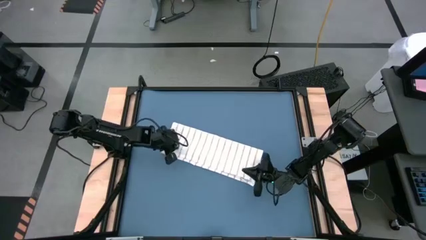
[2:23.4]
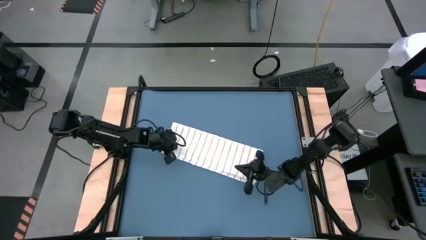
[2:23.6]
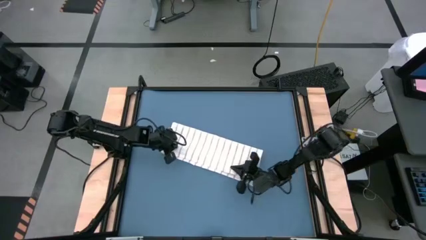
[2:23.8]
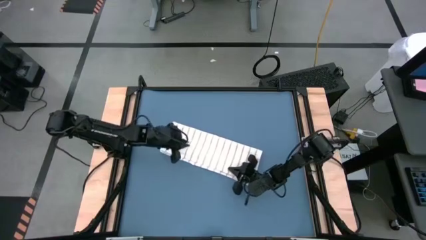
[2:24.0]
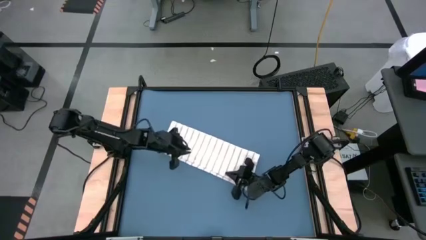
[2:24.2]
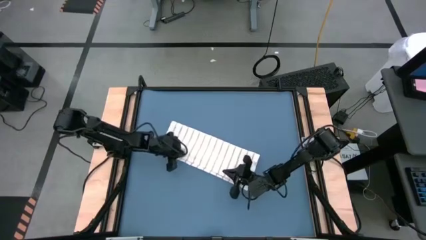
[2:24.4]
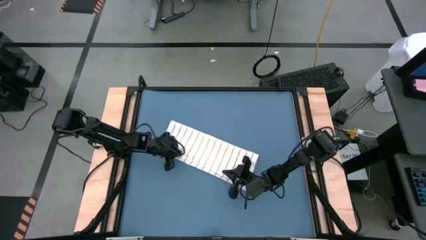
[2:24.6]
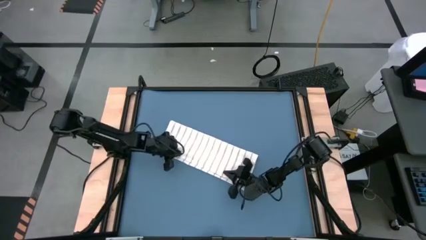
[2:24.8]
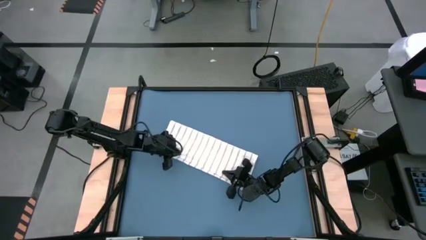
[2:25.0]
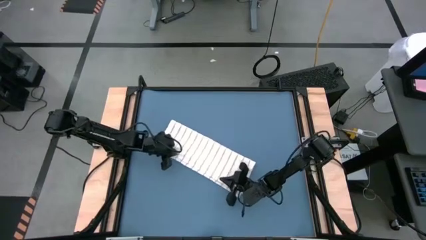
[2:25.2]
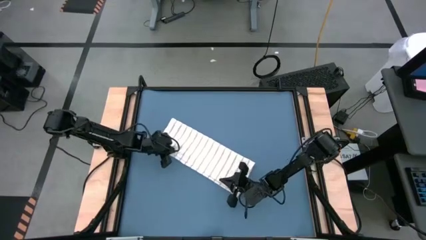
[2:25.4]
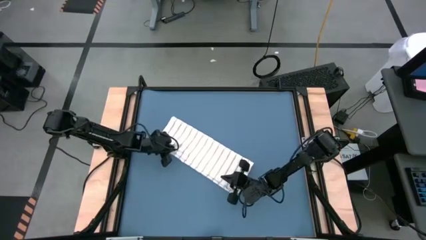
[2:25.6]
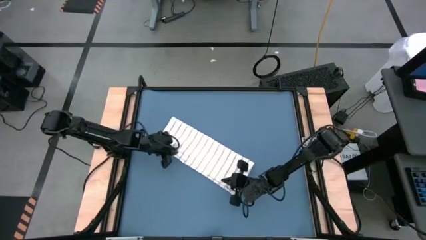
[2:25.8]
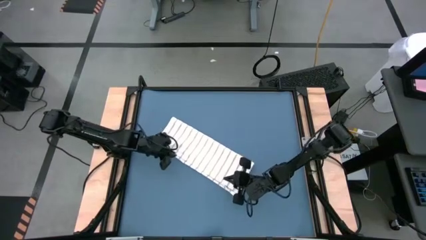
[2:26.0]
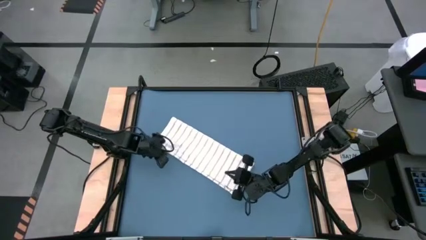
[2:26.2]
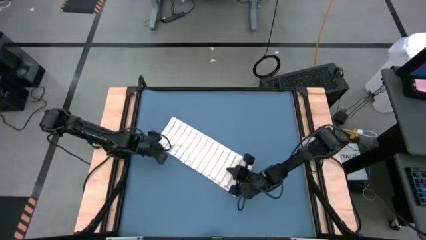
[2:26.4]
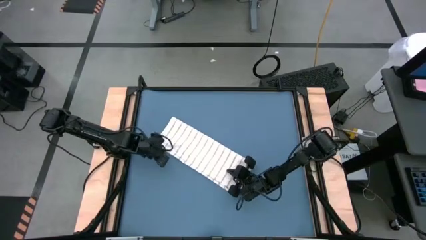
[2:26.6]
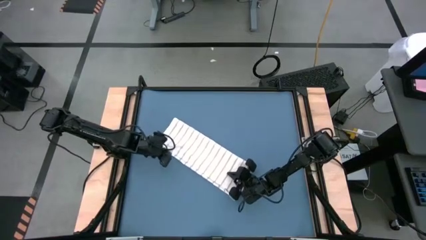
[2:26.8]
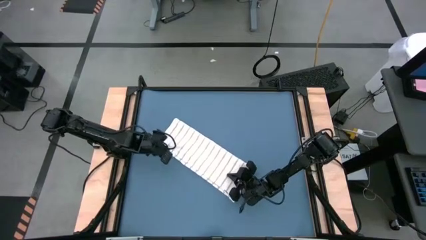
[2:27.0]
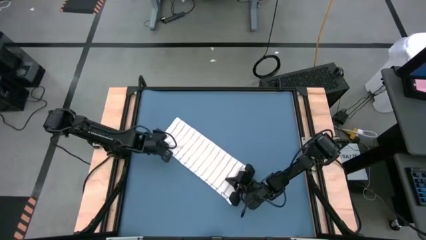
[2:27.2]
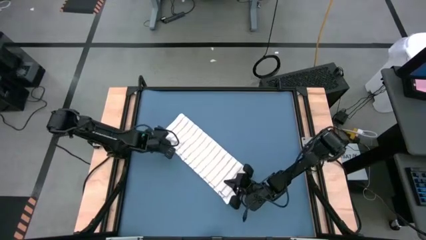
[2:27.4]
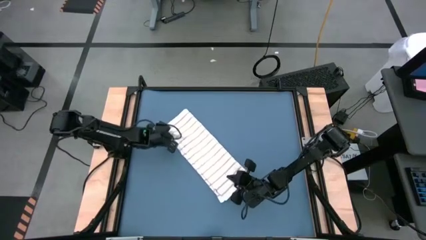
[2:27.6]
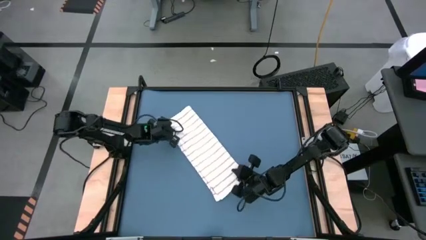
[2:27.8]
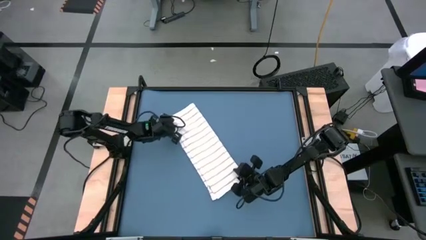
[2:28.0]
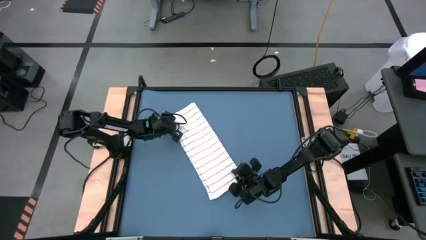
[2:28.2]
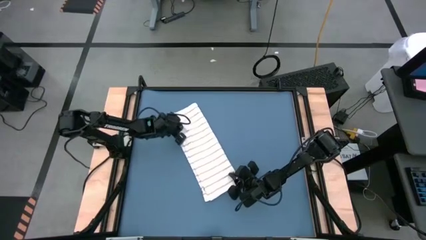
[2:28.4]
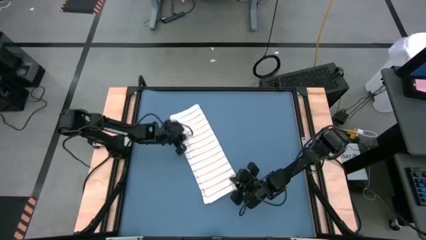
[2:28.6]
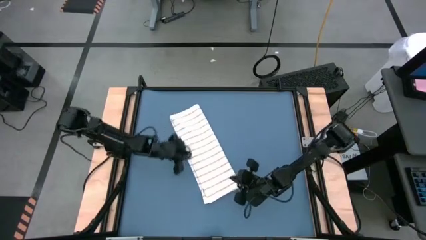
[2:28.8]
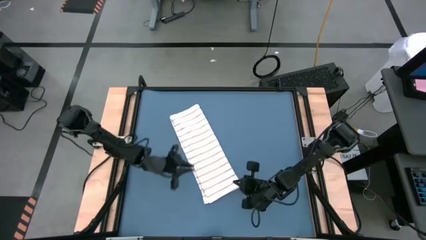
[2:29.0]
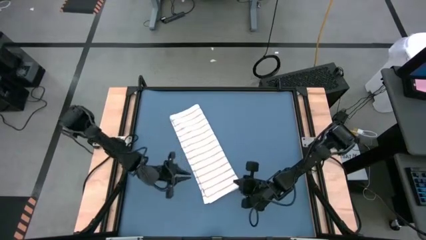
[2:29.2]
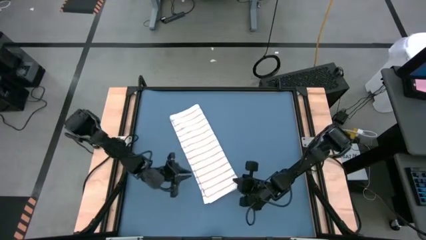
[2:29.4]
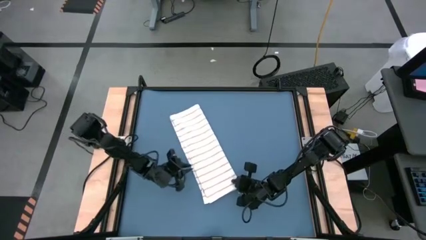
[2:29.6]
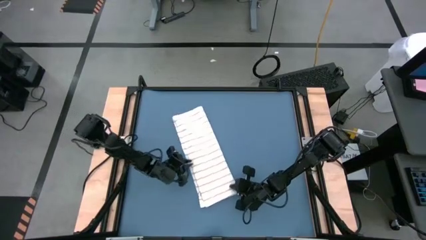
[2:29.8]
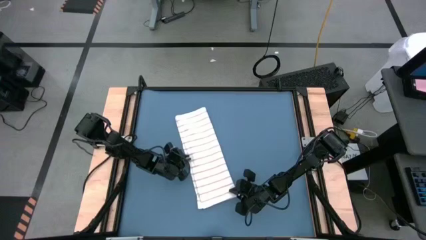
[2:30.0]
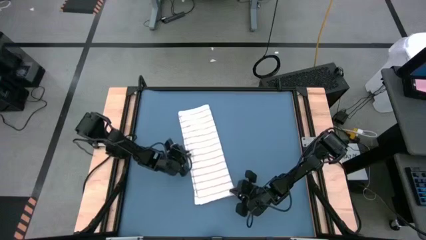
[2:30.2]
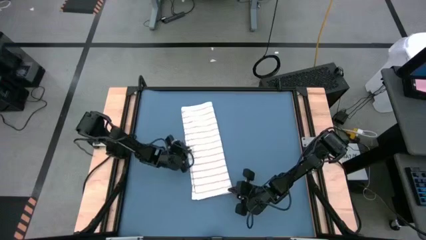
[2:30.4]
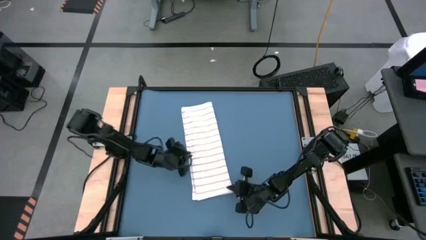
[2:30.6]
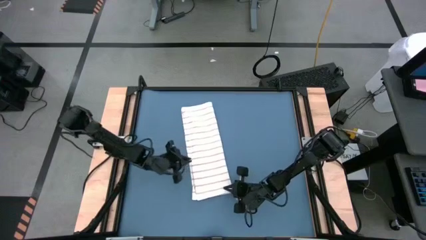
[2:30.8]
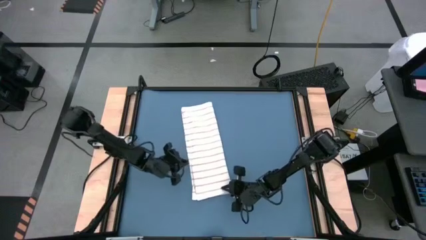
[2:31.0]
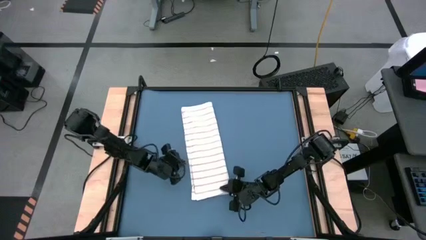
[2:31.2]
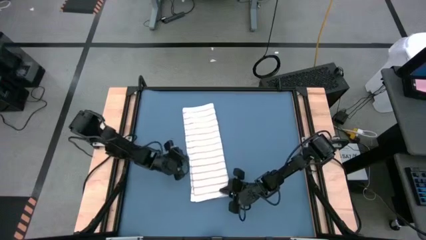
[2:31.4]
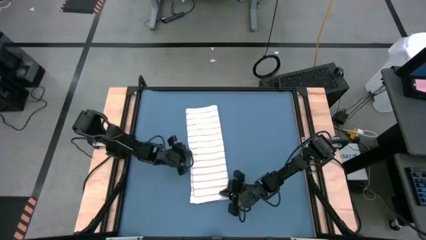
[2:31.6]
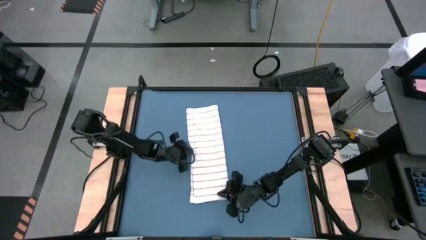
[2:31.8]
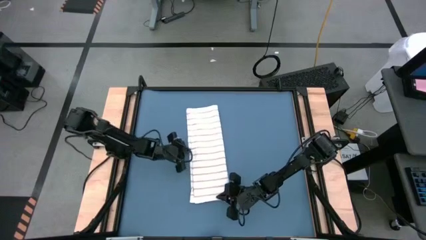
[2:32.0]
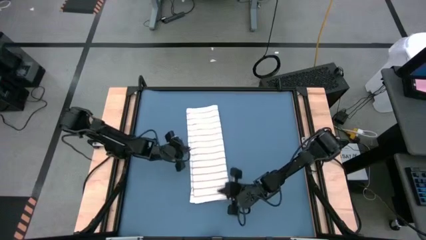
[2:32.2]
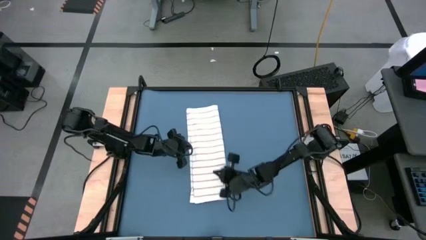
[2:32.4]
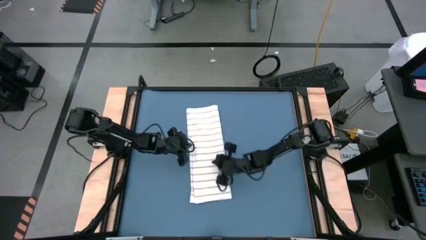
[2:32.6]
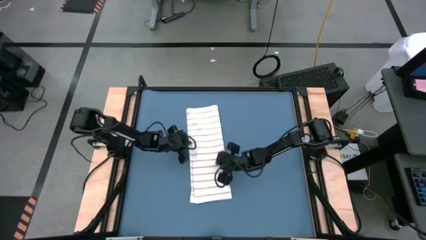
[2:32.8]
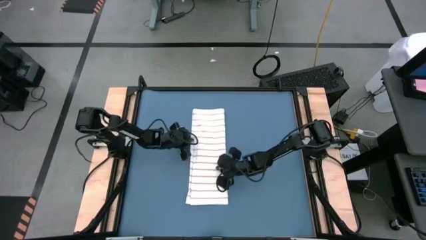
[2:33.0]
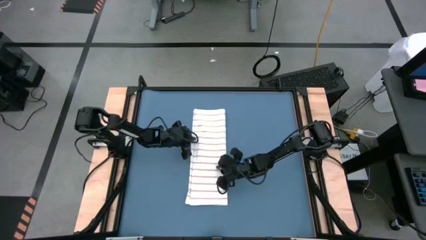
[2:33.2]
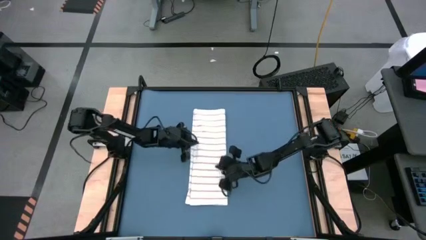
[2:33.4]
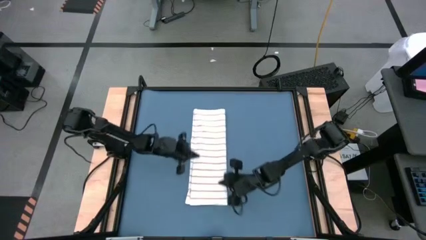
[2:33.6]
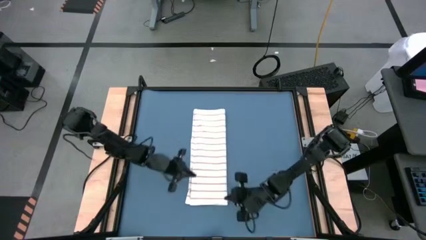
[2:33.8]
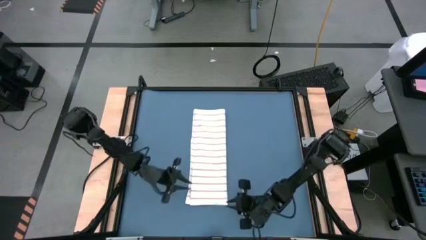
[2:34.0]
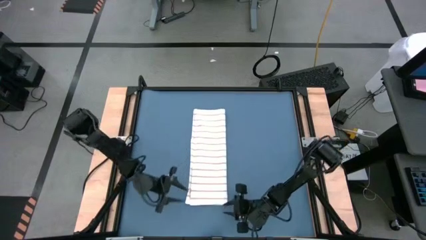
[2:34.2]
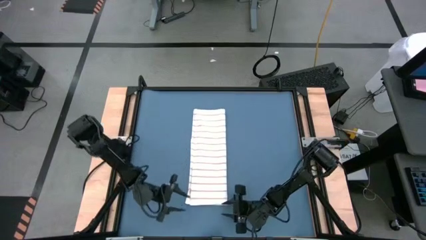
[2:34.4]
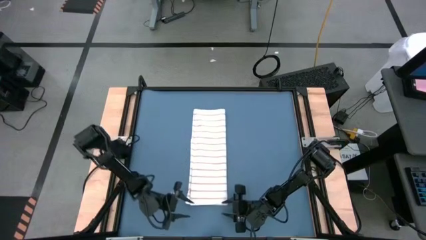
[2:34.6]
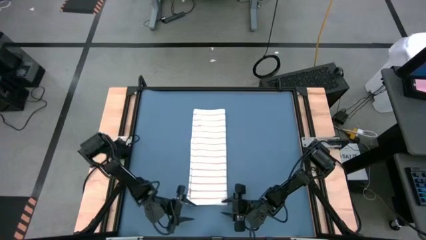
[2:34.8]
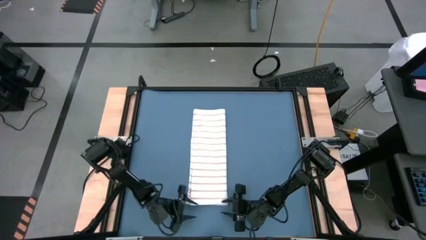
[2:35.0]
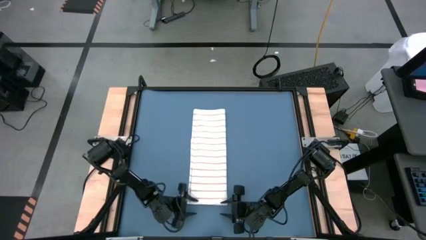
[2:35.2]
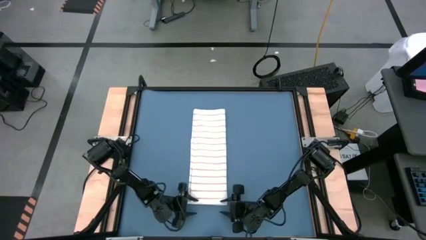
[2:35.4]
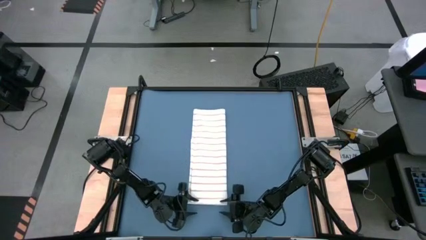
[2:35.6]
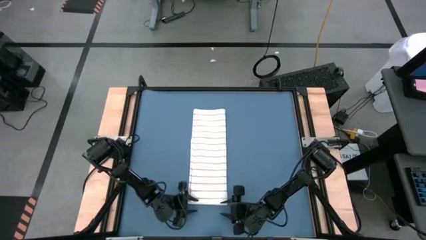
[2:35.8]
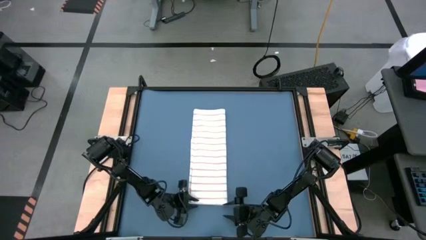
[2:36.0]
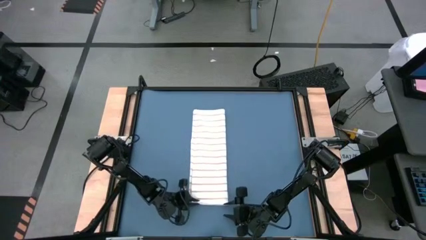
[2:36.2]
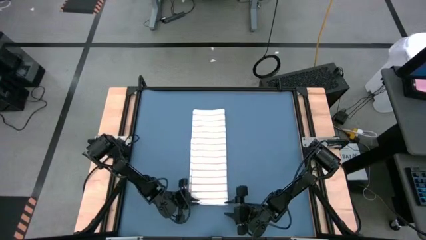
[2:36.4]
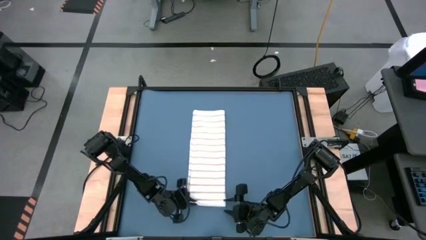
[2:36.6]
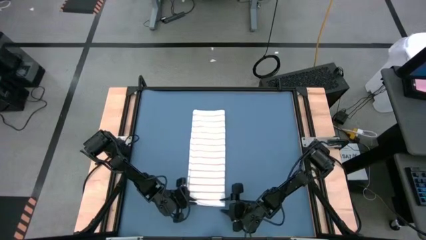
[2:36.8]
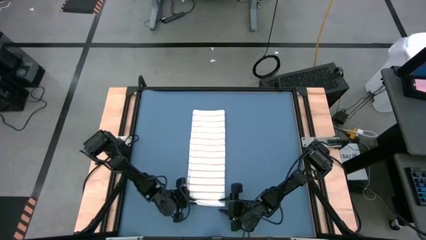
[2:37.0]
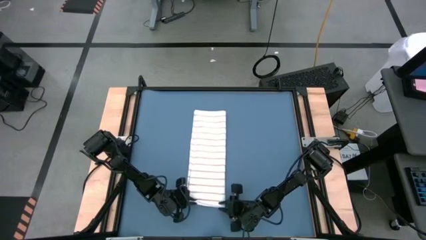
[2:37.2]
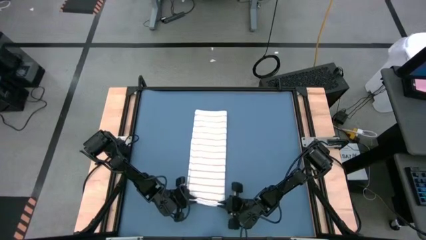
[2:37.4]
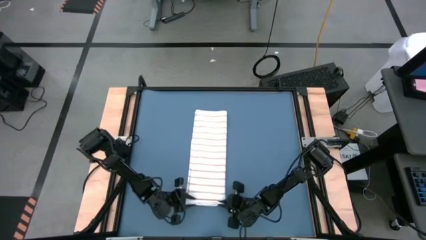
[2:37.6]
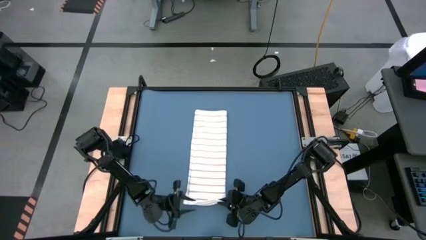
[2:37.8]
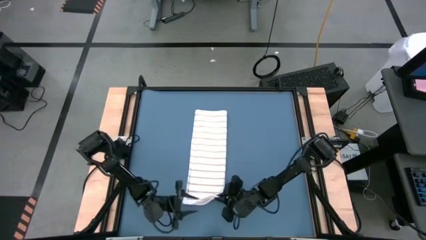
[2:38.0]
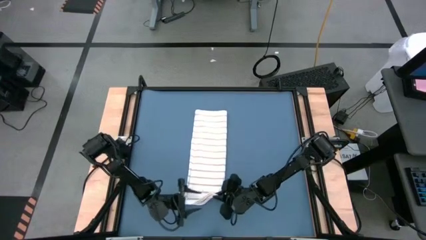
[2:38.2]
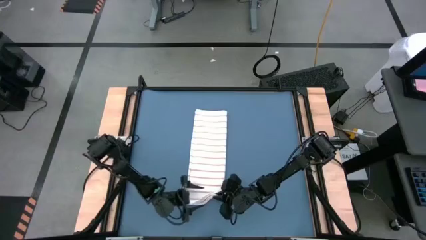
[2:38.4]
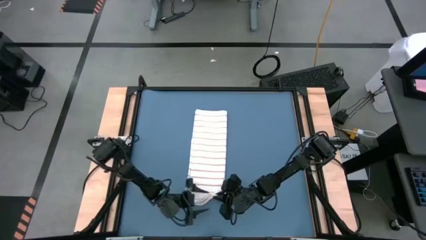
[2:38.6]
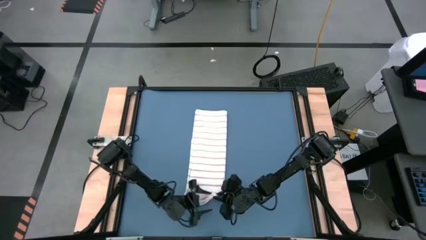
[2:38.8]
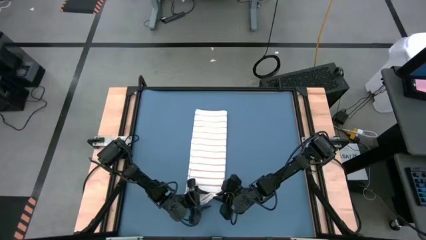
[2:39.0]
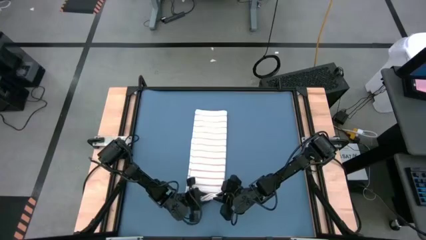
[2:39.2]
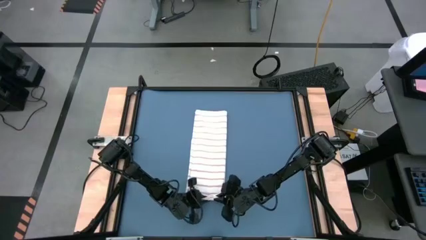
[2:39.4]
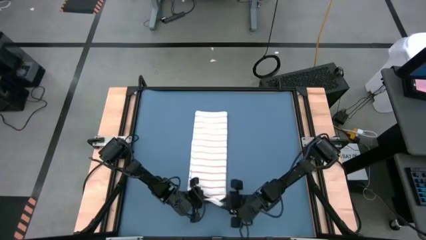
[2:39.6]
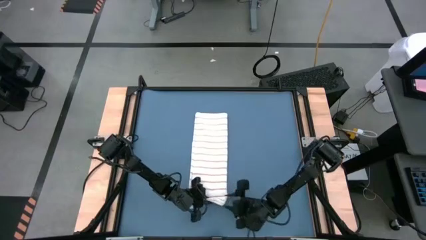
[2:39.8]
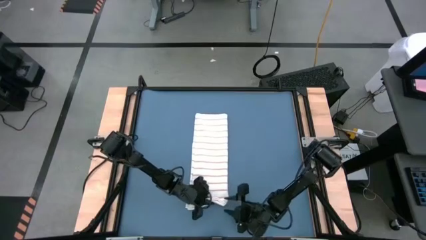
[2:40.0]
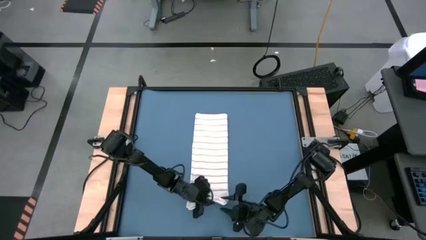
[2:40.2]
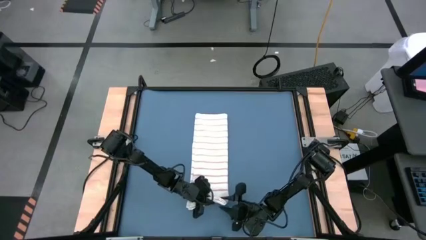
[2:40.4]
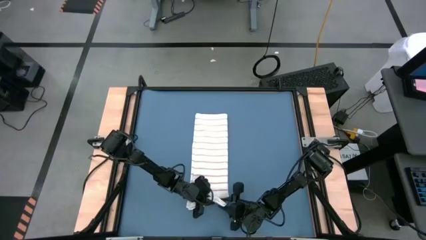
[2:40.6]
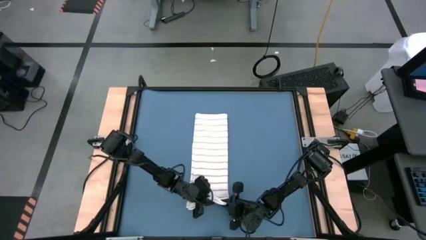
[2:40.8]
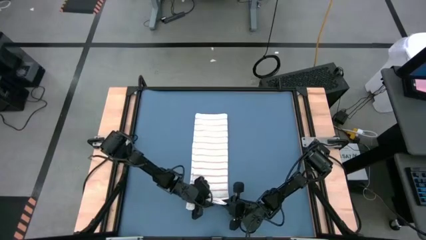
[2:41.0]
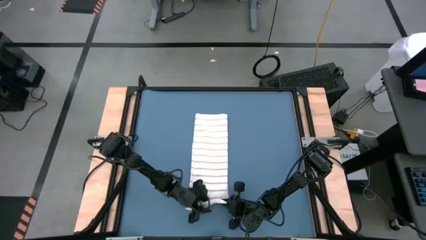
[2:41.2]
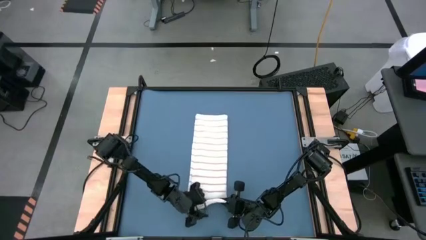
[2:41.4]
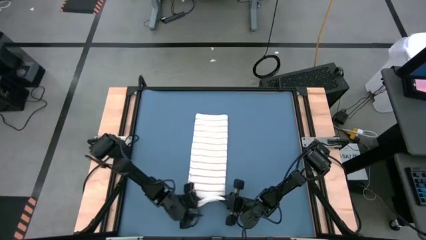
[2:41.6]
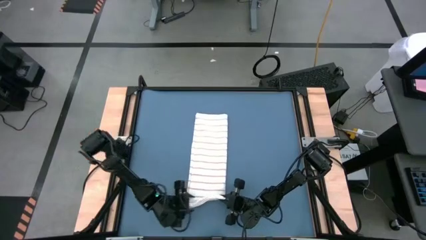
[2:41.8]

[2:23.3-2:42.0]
Task: Roll towel
Roll the white towel
